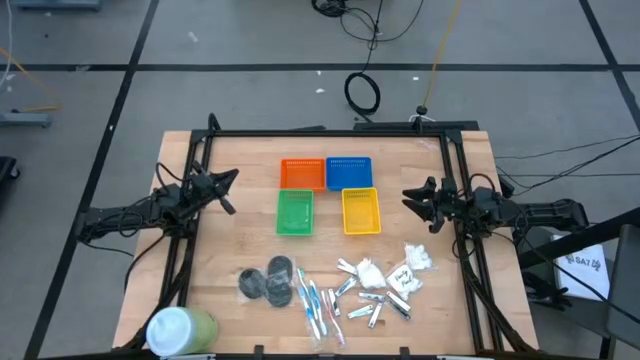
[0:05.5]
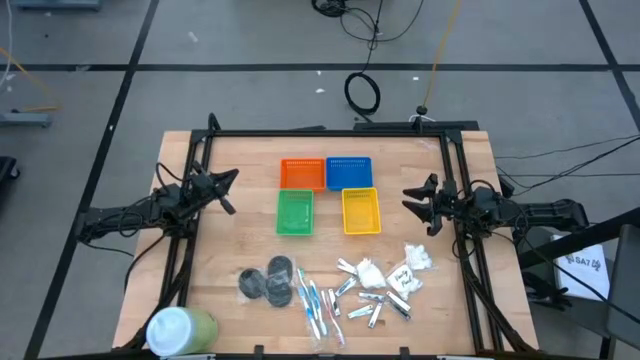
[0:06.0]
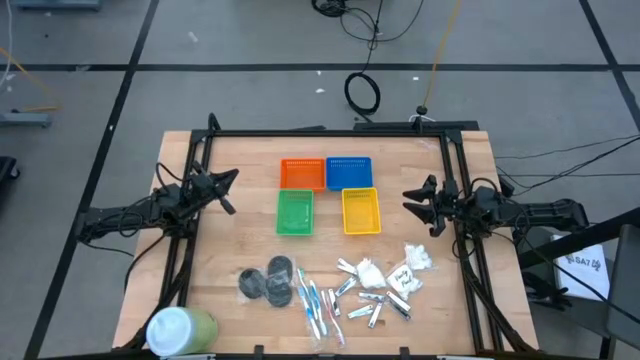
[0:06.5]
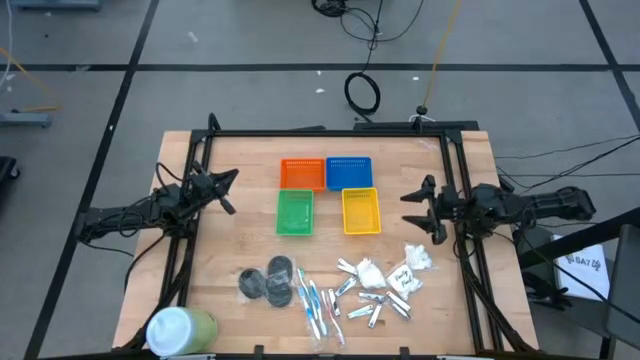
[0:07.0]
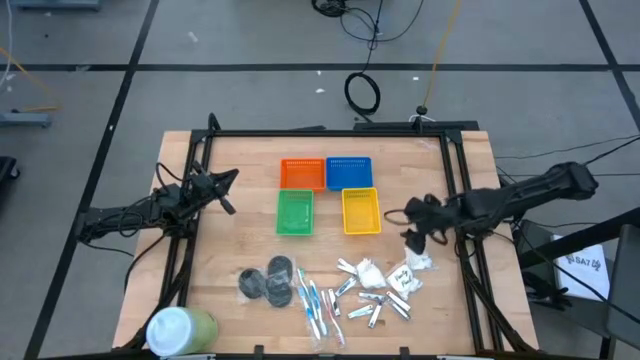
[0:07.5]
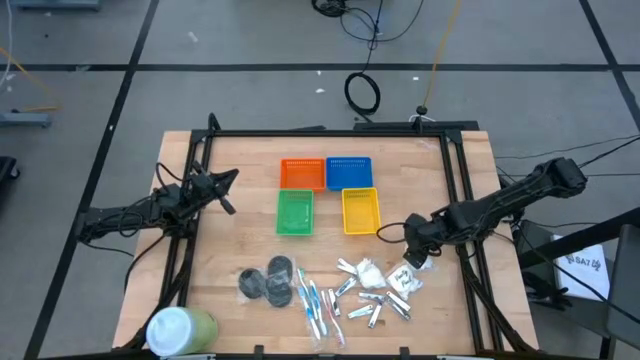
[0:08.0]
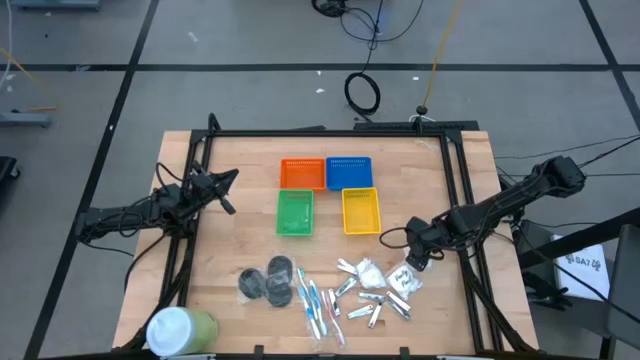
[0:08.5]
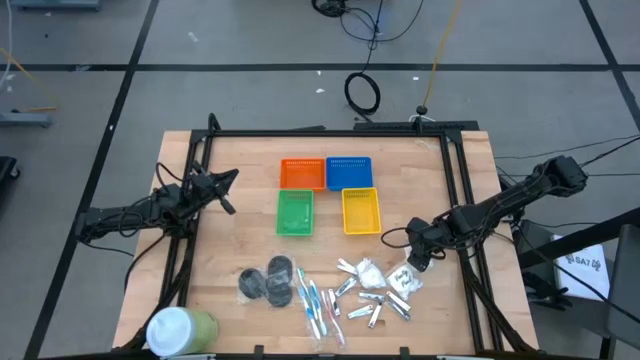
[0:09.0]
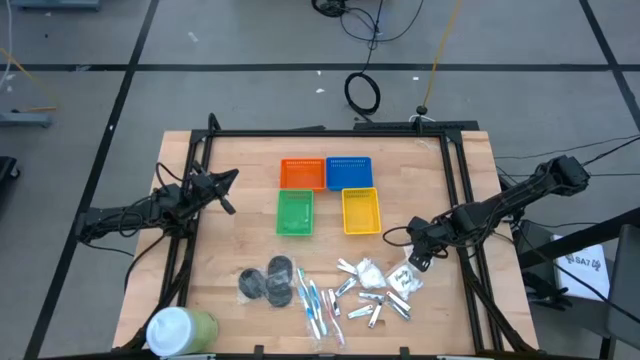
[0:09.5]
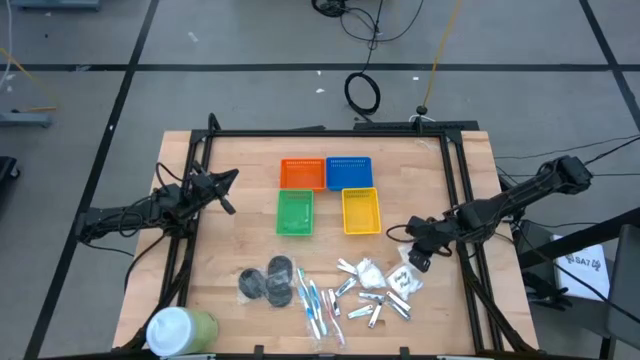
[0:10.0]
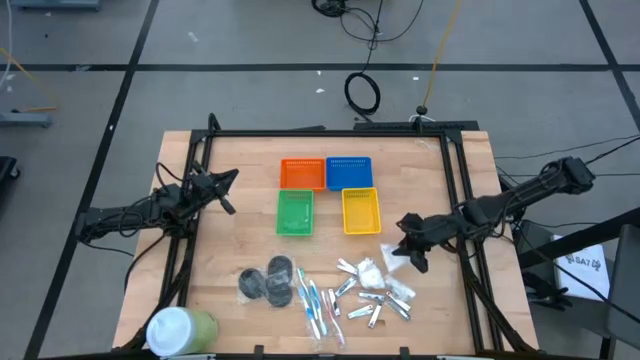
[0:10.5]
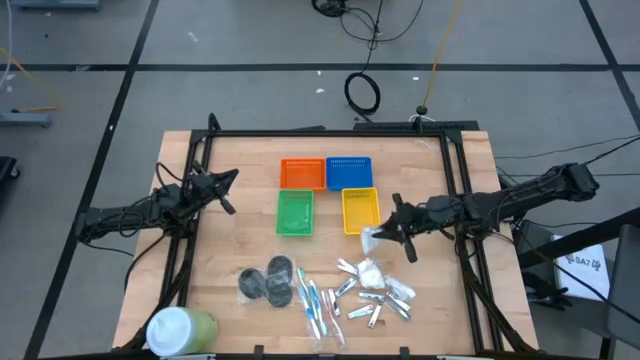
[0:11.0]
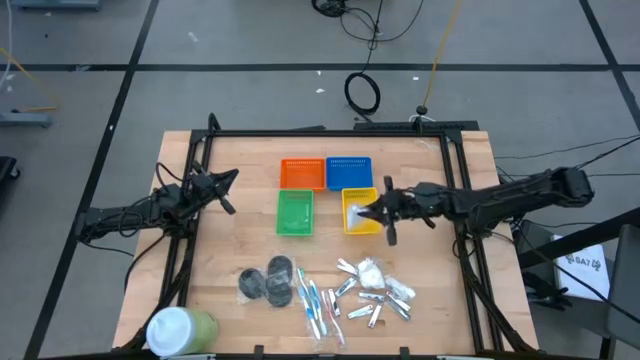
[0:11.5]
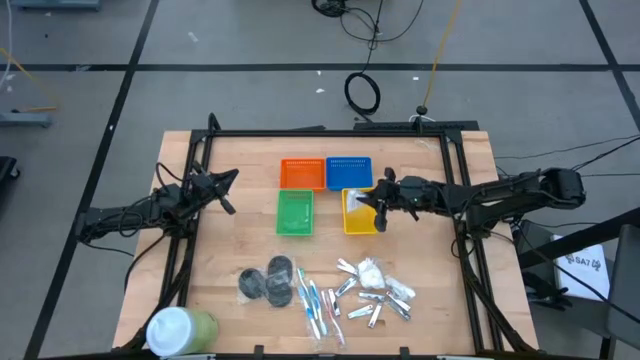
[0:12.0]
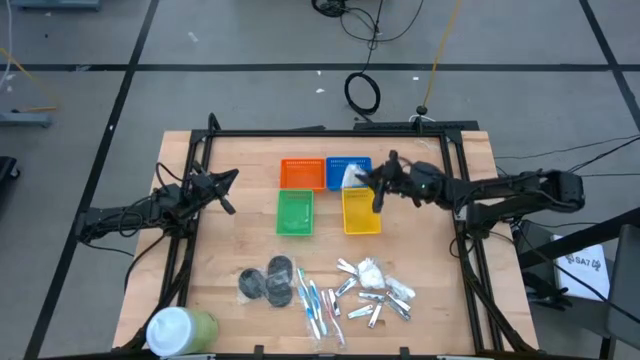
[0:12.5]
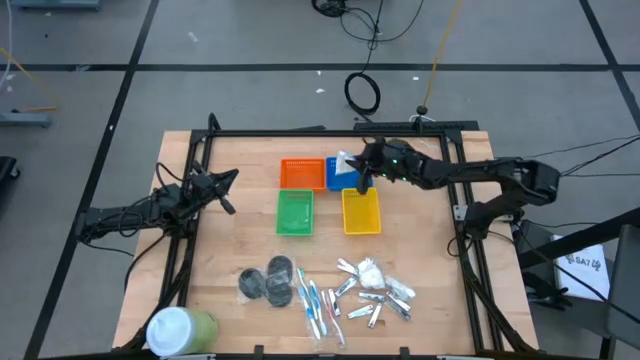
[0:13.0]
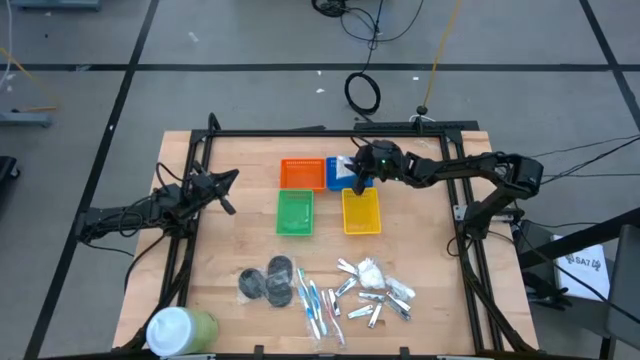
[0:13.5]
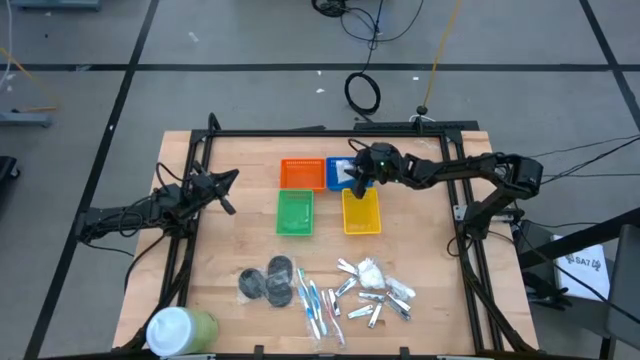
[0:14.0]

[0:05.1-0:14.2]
Task: Pick & Place Travel size toiletries
Put the white vanity pack into the blue bin

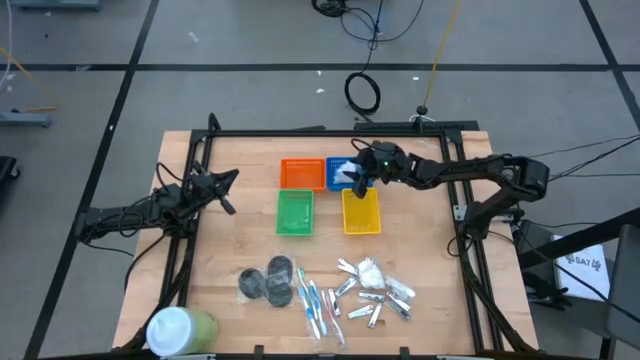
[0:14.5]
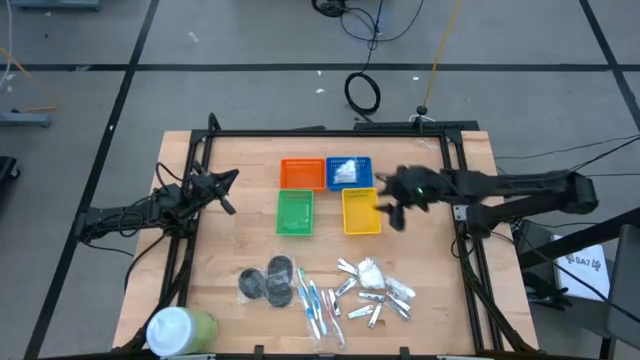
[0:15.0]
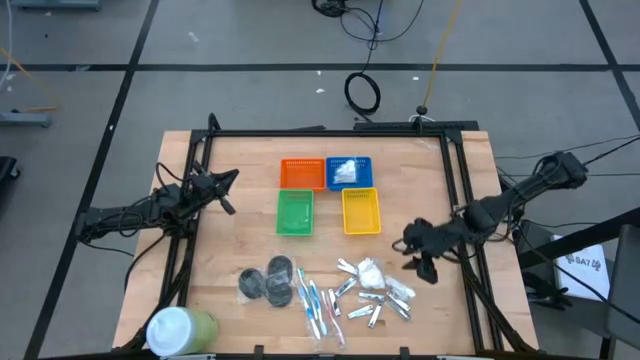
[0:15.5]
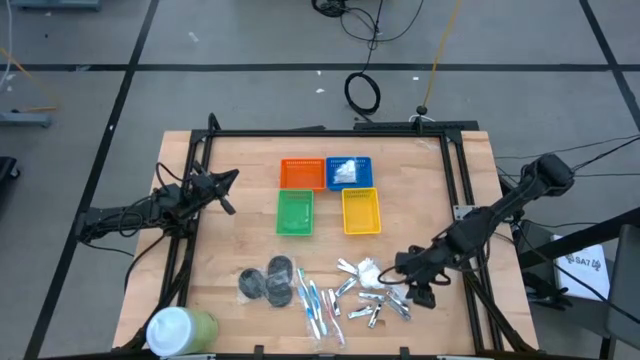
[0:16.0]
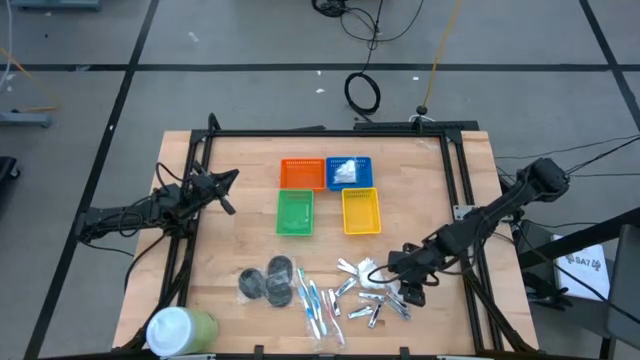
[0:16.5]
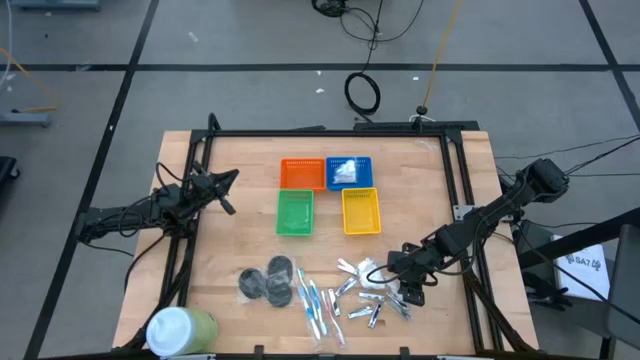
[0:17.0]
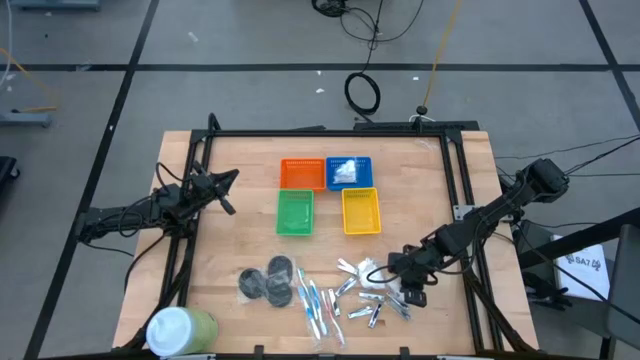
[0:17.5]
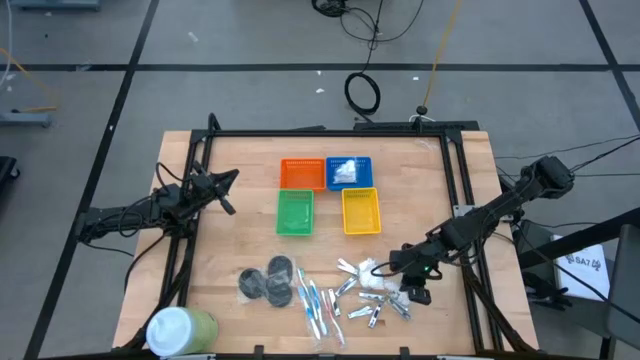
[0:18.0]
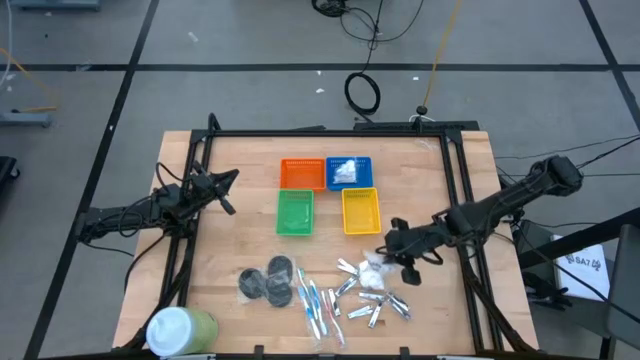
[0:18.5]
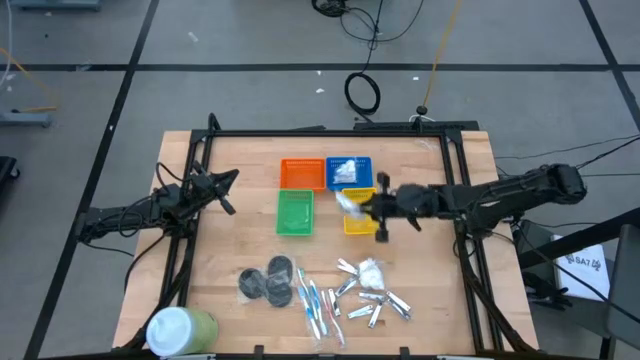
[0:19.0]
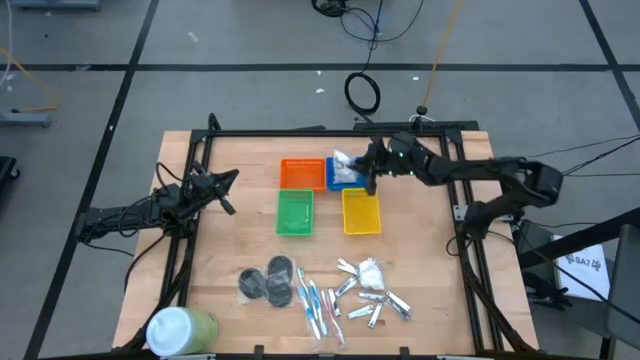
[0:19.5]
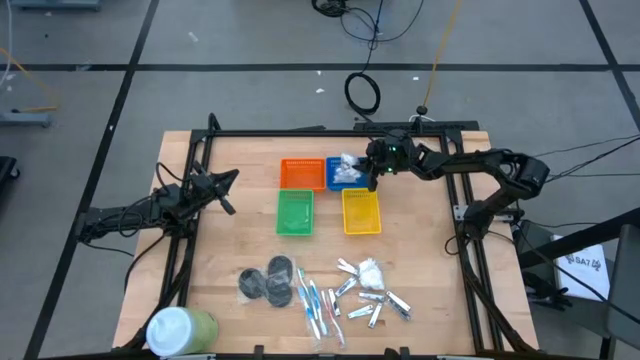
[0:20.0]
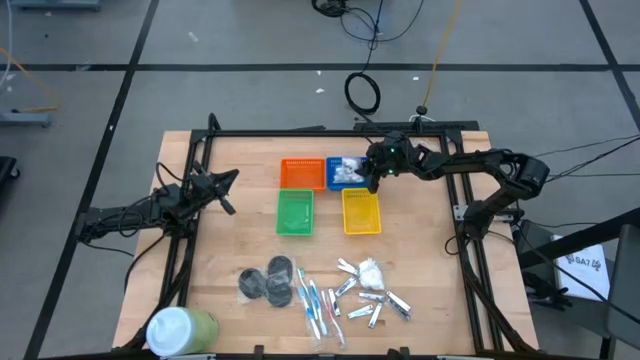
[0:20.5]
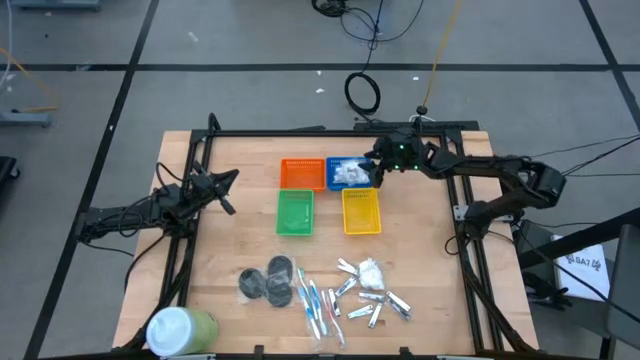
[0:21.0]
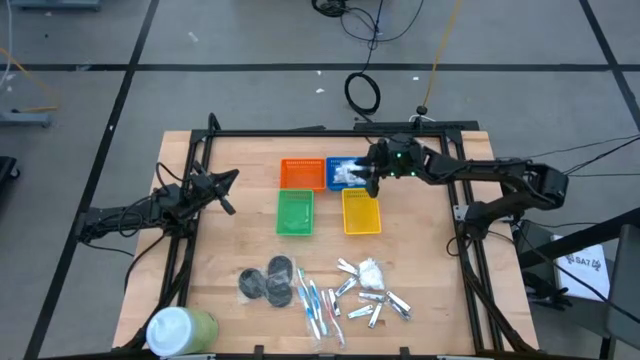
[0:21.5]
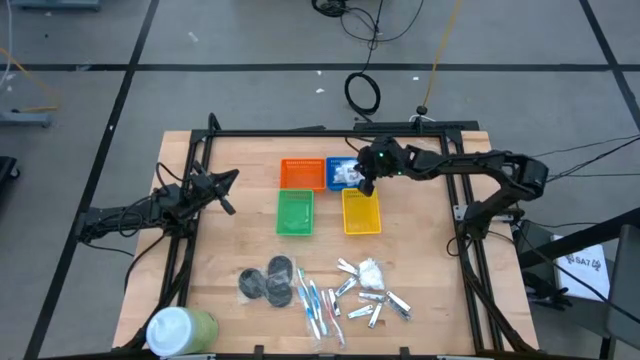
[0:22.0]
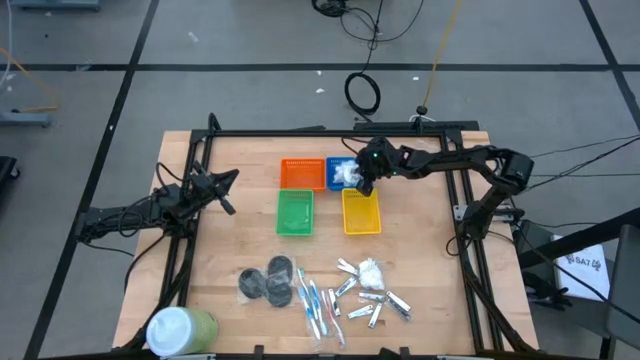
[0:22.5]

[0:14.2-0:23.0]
Put the white vanity pack into the blue bin

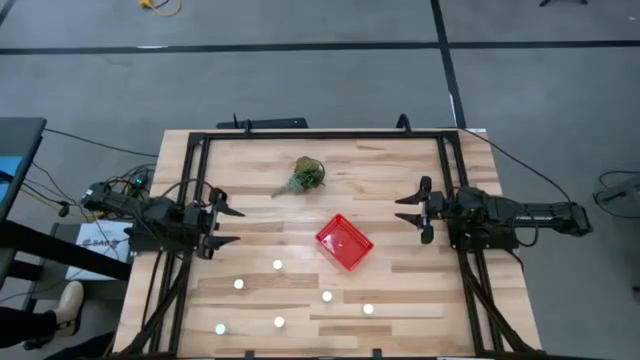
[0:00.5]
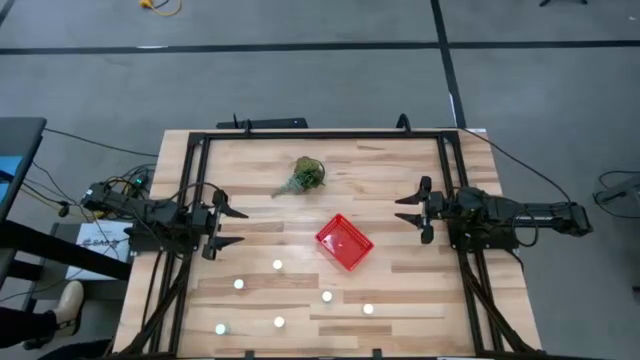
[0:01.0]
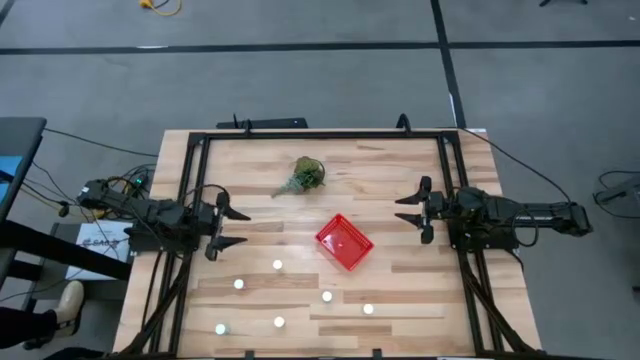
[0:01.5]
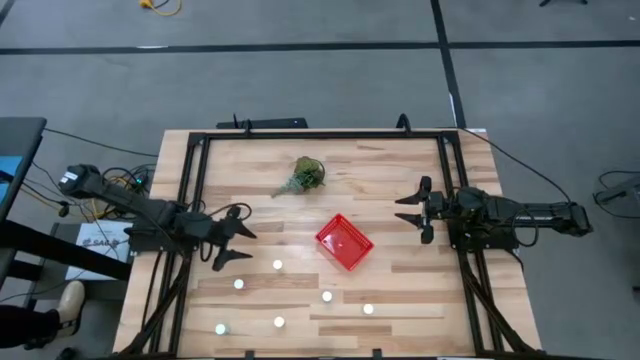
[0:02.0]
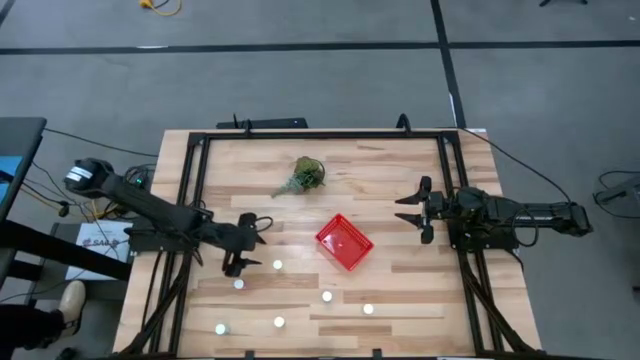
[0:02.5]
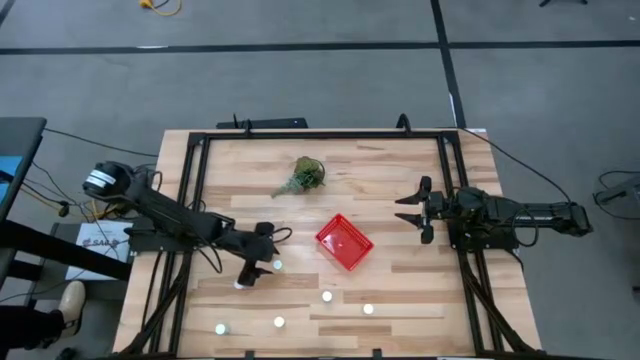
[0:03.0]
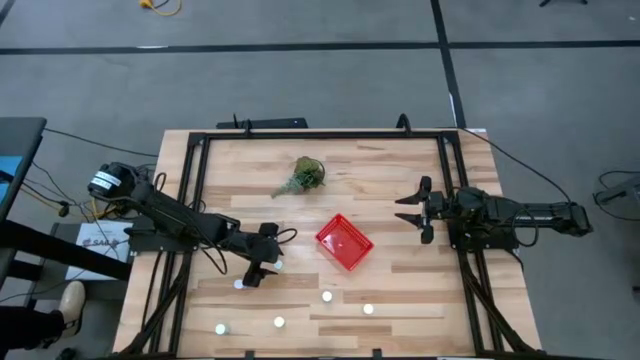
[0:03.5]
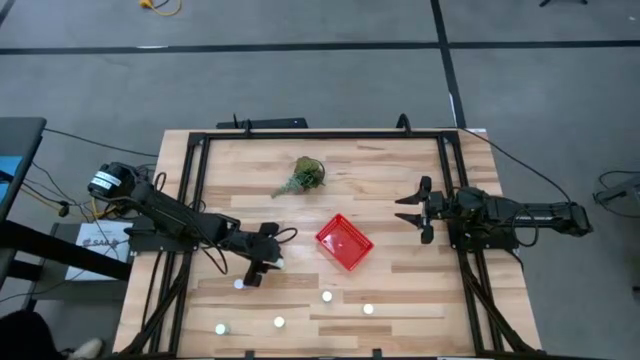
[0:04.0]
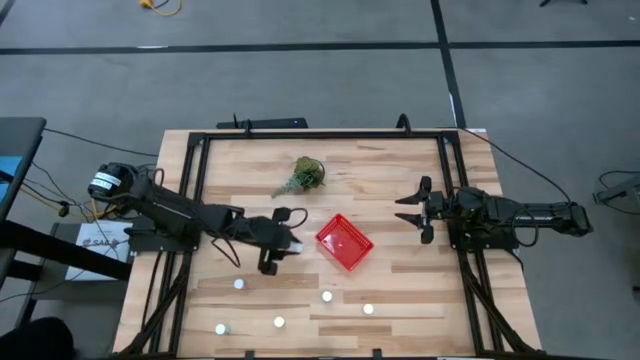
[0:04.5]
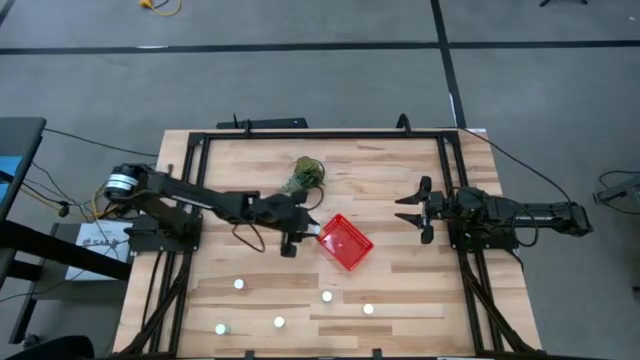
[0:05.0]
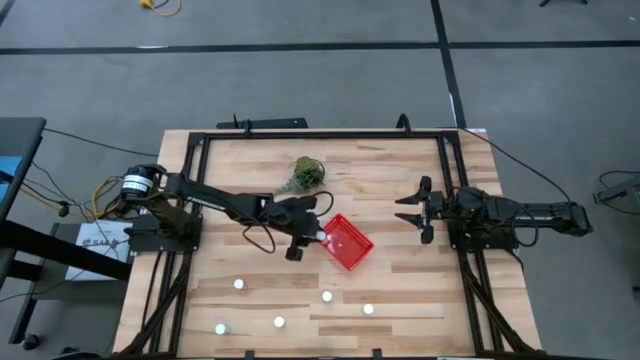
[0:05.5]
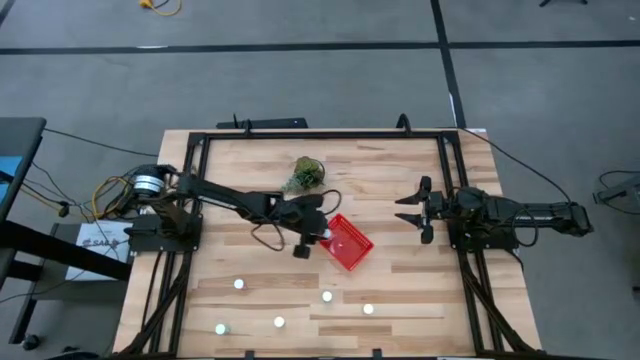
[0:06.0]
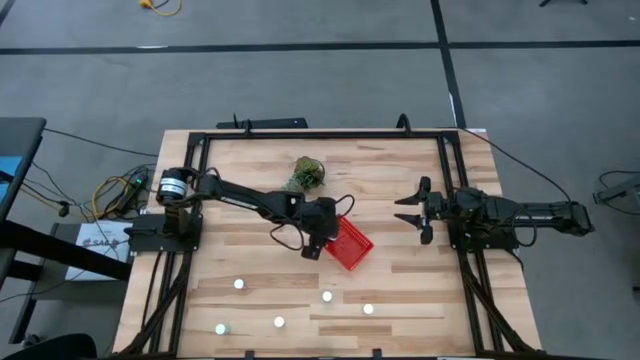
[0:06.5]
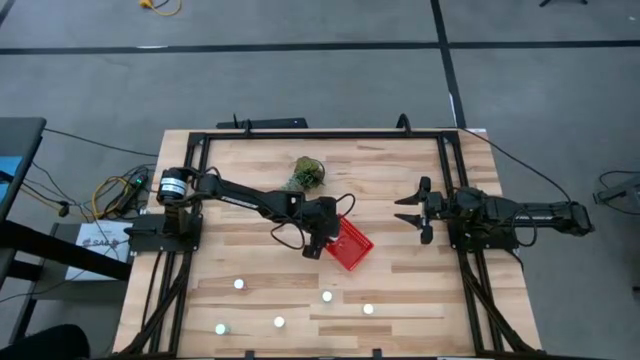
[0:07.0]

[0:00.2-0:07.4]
Task: Pick and place pill bottles into a basket
Put the top left yellow pill bottle into the red bin
